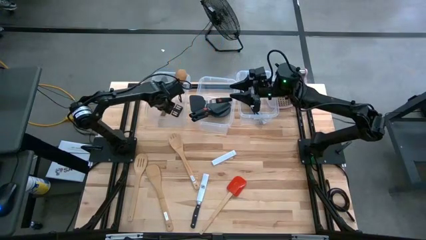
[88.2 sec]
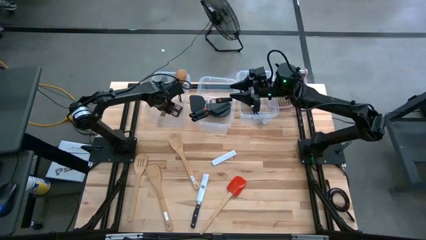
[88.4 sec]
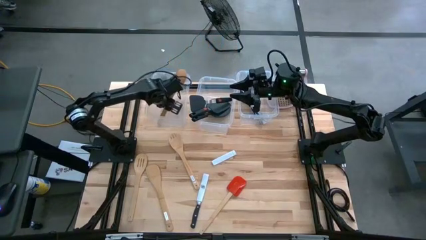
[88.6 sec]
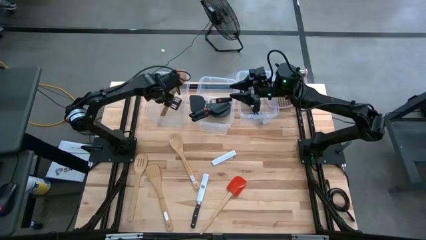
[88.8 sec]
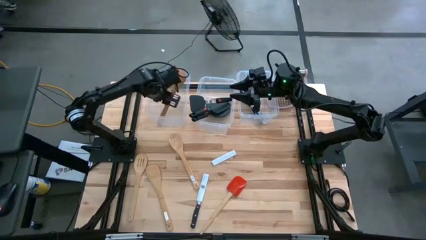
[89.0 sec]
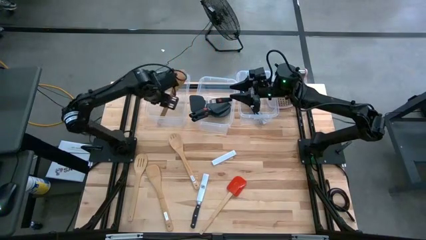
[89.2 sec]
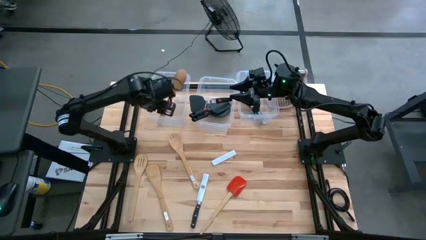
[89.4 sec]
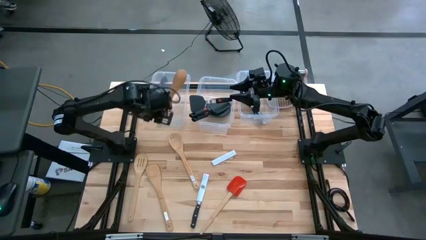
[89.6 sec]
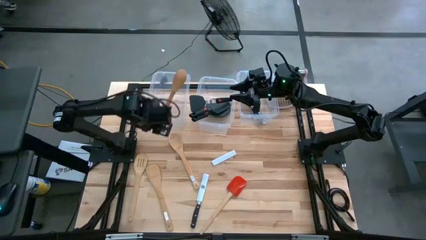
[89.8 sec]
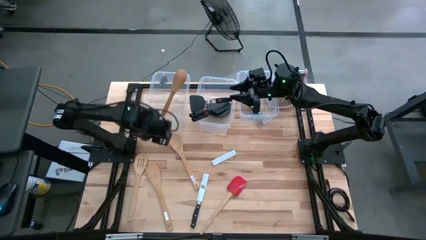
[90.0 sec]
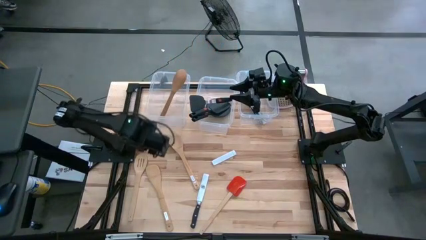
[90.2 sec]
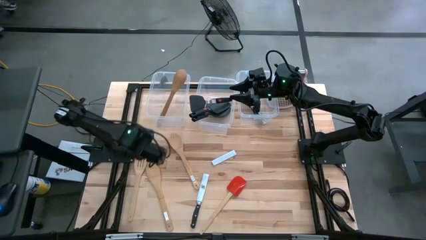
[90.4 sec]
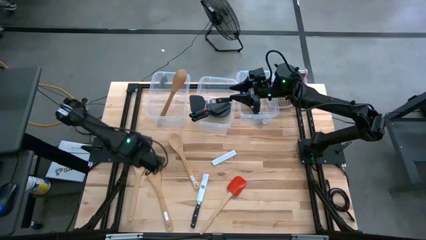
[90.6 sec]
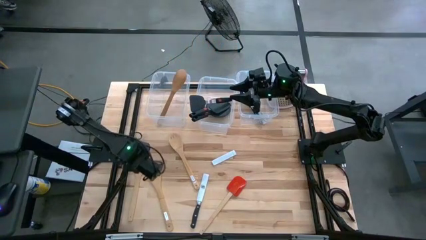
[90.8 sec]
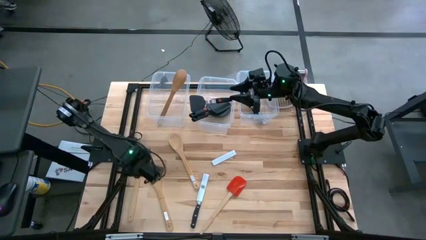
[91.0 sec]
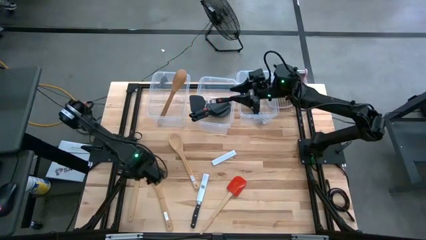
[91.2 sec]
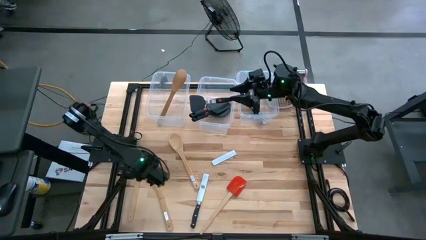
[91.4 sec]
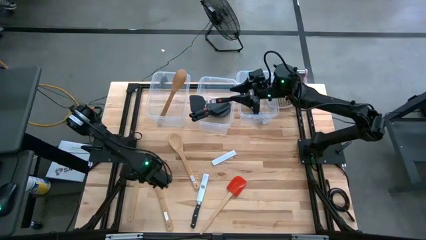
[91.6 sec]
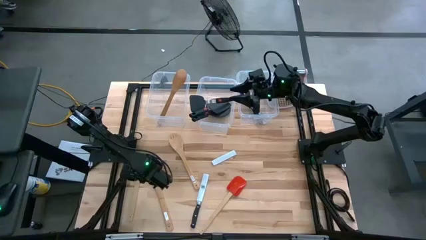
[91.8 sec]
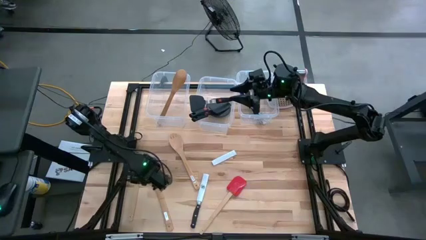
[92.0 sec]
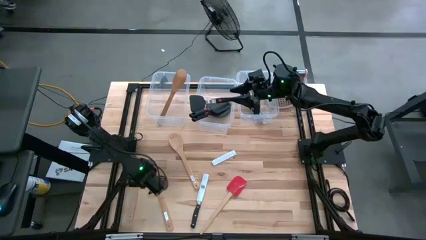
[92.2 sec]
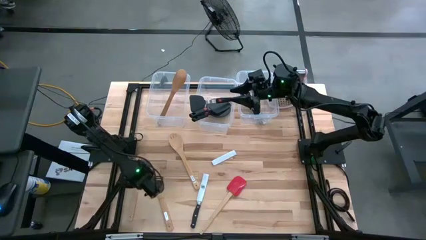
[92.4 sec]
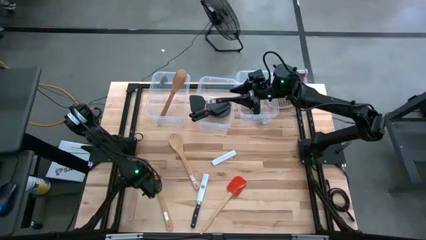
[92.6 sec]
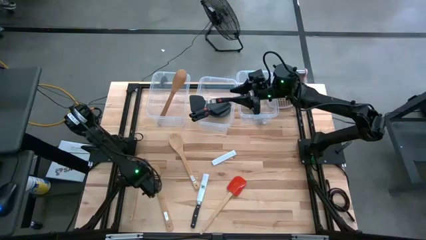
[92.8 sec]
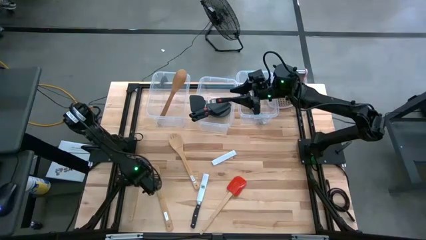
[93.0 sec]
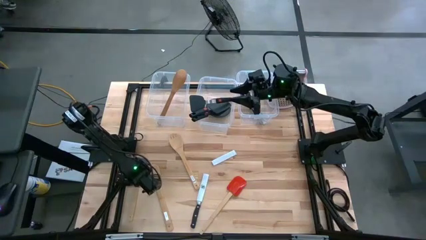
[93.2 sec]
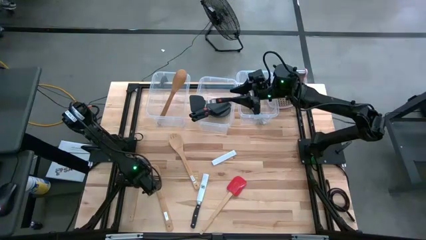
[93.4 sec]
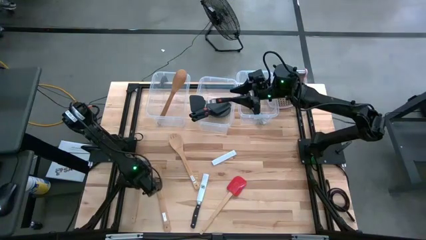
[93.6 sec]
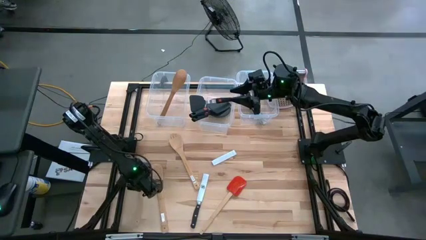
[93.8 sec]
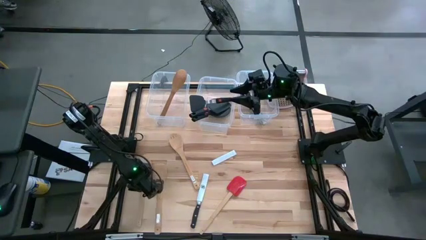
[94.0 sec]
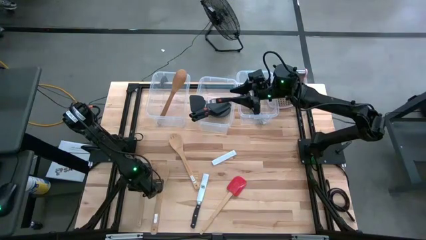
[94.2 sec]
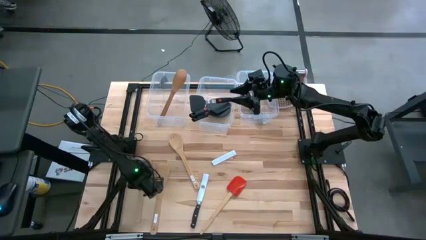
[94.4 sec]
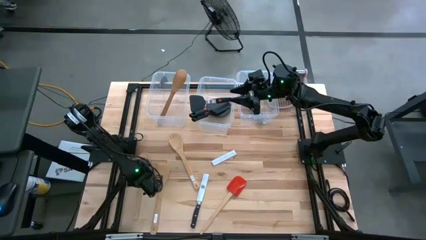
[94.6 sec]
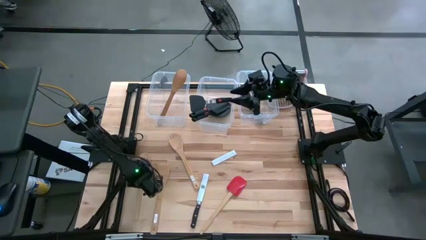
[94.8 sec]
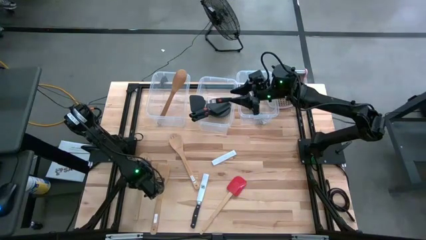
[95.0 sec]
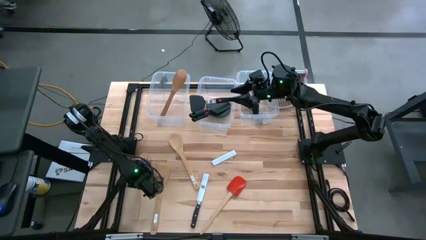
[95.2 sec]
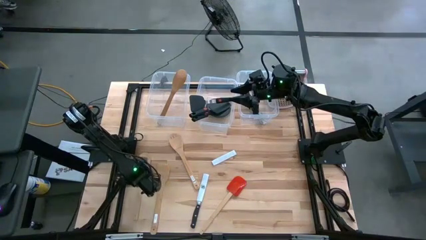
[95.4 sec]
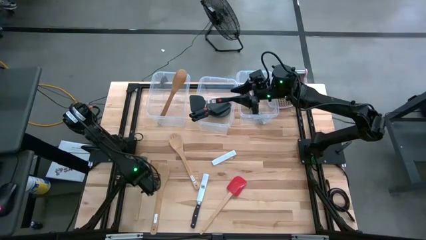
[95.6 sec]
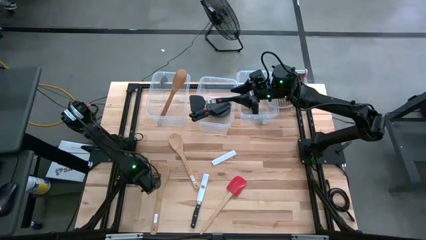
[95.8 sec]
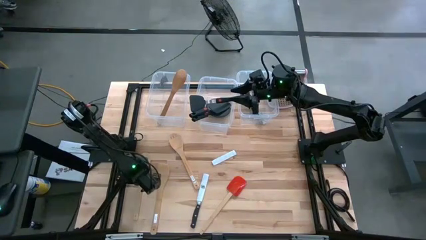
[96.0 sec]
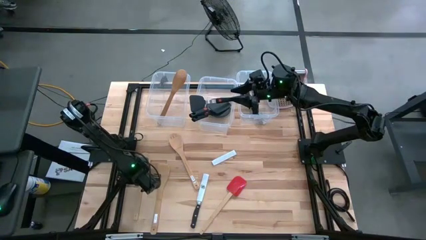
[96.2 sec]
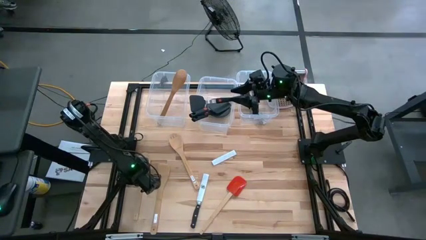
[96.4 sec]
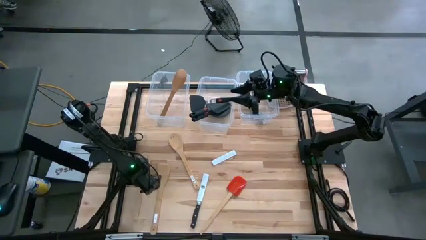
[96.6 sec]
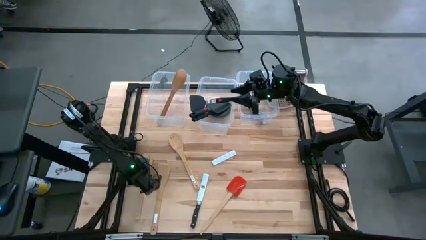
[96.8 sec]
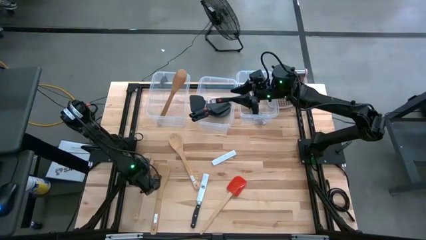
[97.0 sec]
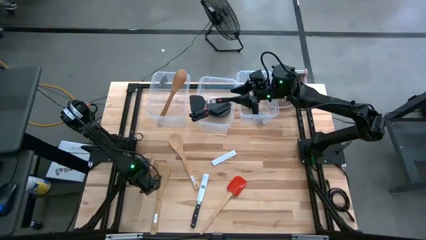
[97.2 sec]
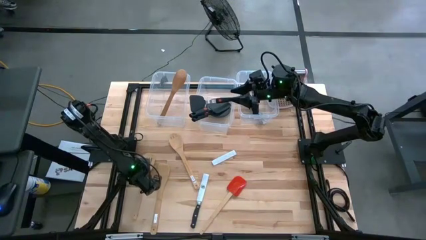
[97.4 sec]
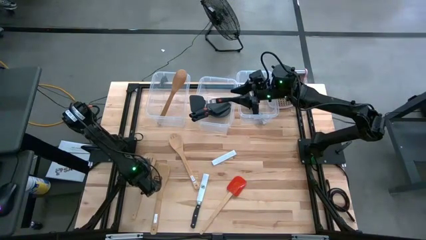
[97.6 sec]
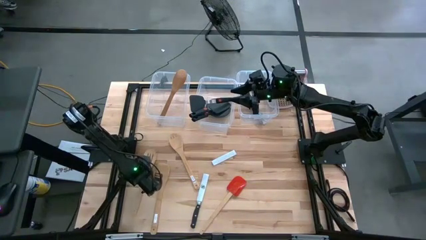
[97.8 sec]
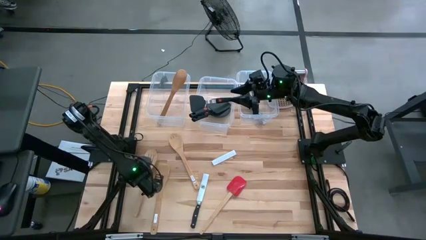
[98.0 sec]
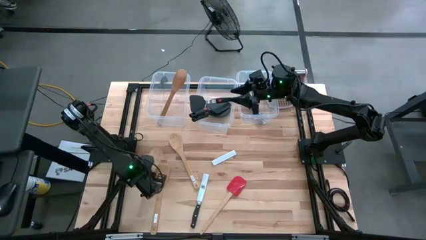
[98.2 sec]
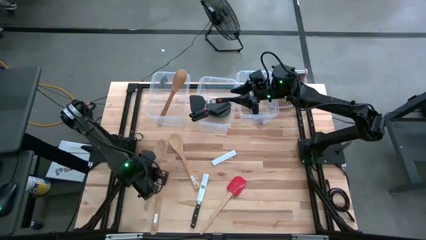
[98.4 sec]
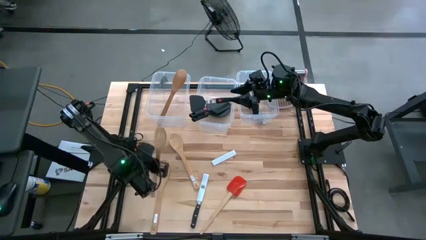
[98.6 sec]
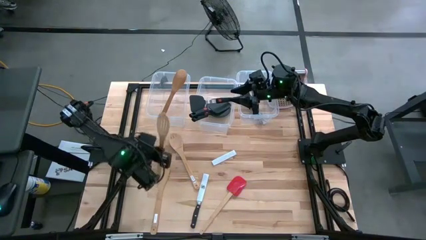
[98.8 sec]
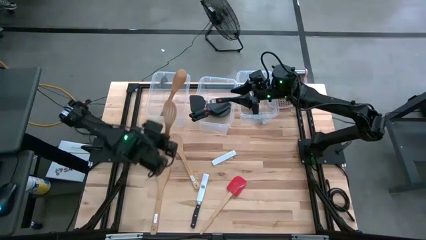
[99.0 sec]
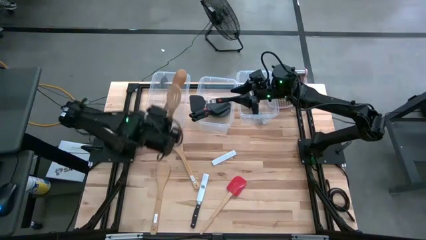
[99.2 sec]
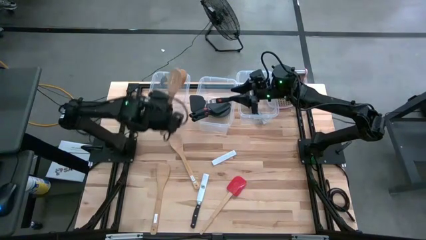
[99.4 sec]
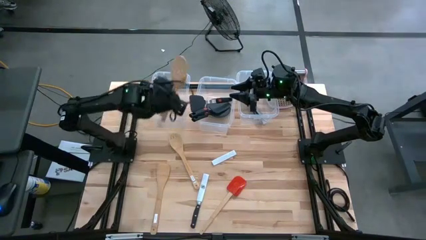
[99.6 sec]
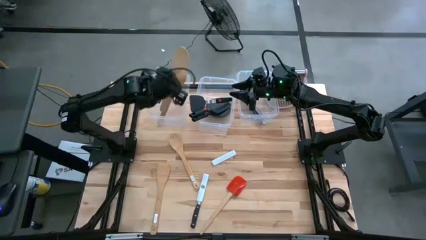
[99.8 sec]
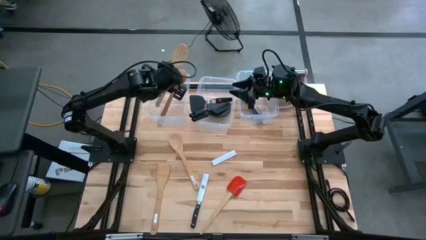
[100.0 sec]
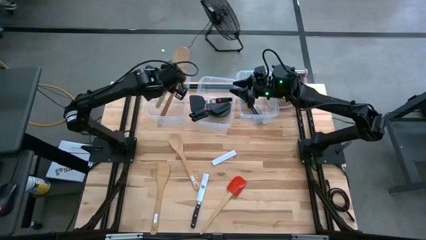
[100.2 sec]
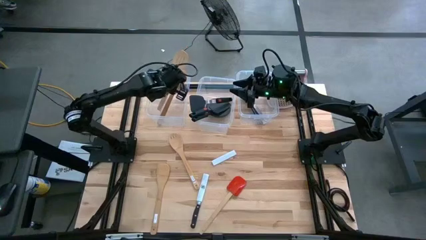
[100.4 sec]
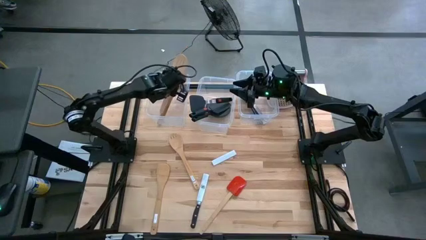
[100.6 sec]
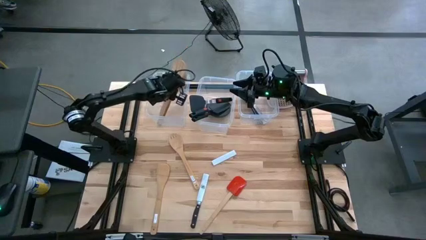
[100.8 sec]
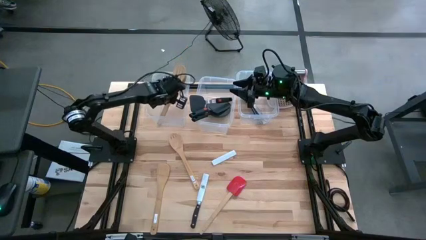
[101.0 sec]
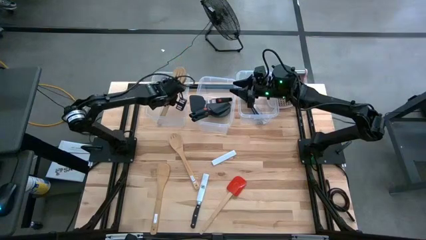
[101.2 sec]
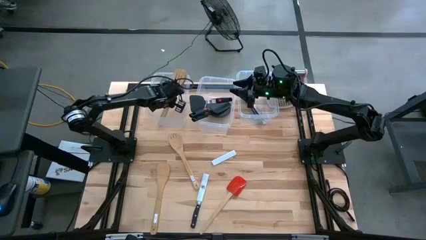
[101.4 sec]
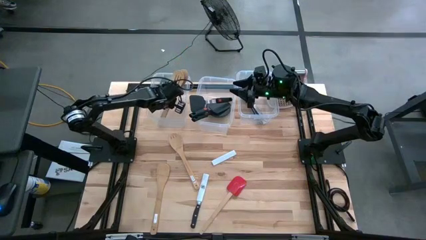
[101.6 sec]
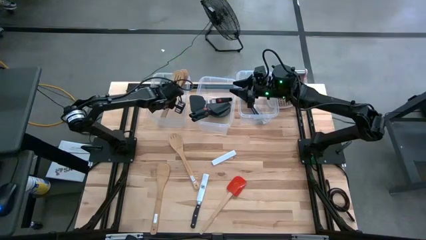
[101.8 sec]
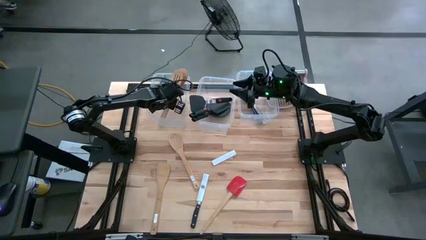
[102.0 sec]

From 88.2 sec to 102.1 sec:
Task: Pick & Place Kitchen Items
Put the wooden serving spoon into the left bin
